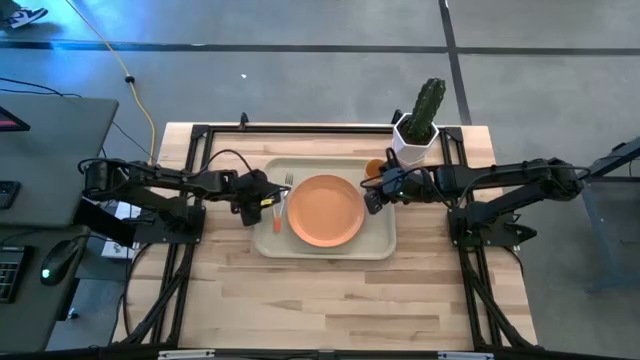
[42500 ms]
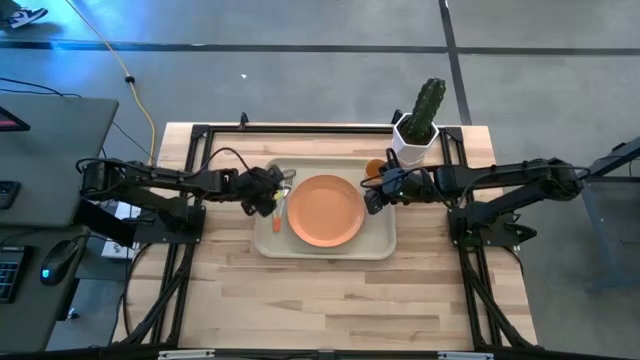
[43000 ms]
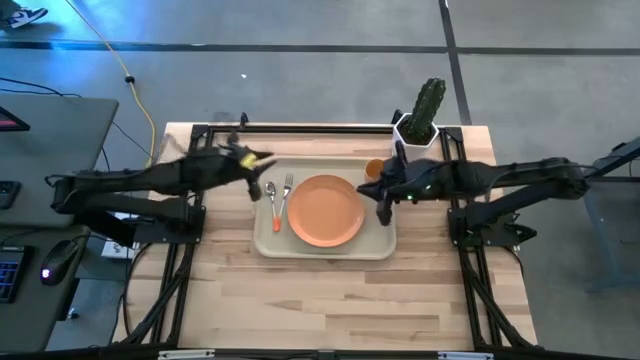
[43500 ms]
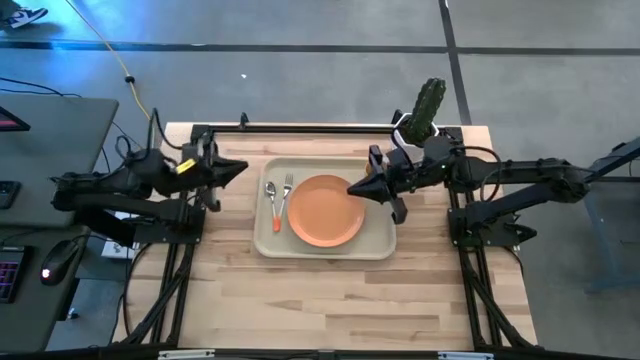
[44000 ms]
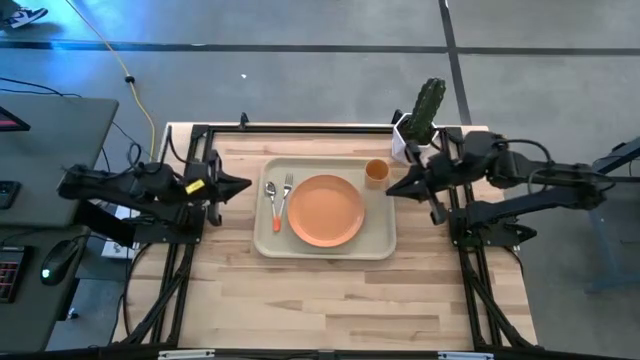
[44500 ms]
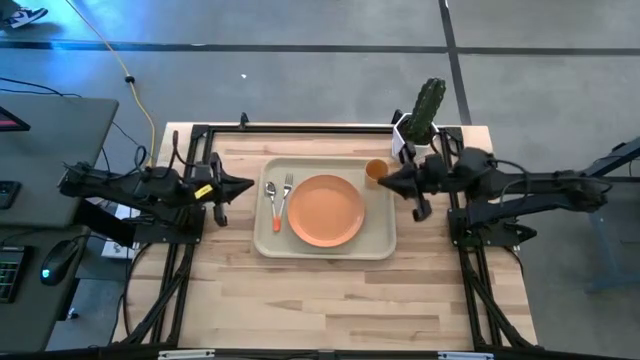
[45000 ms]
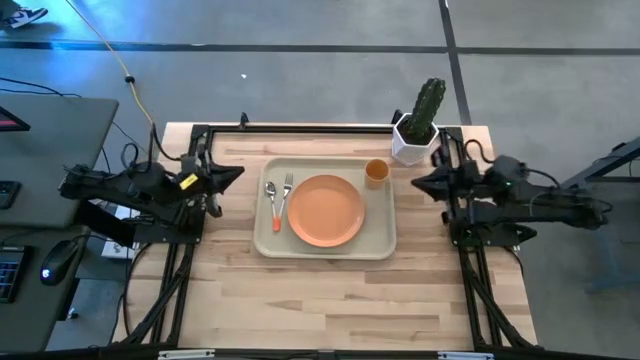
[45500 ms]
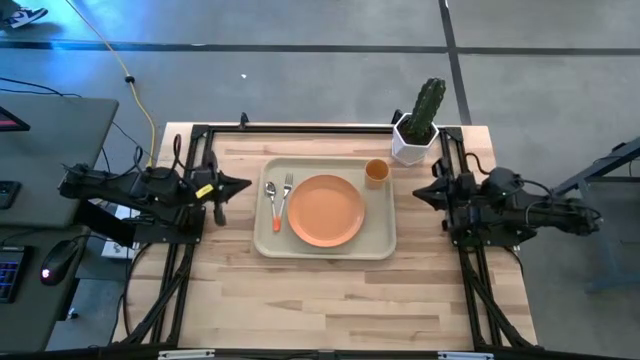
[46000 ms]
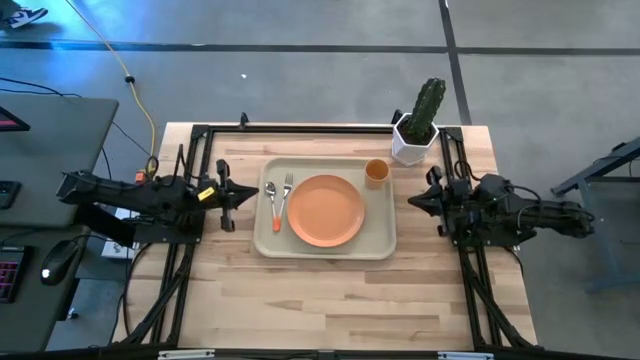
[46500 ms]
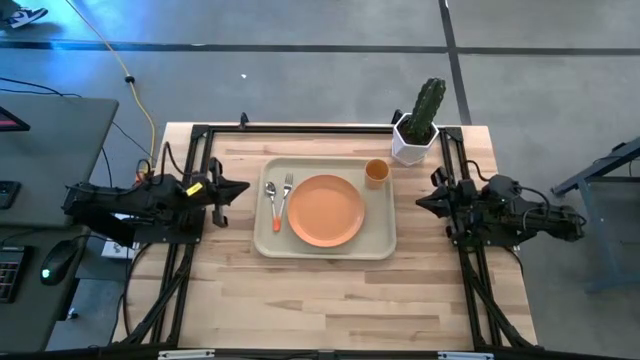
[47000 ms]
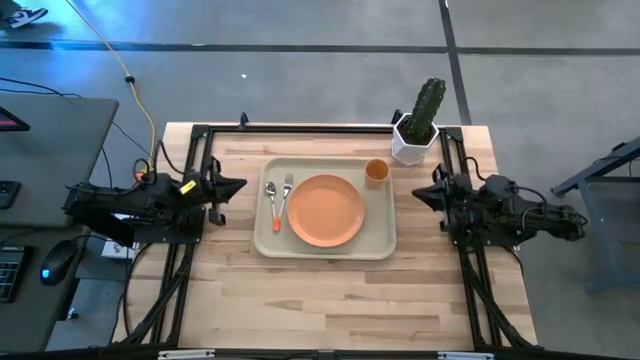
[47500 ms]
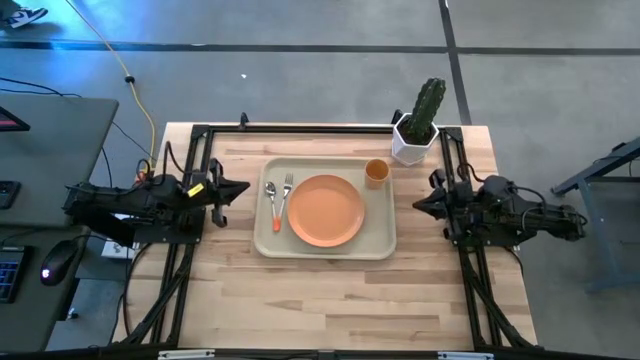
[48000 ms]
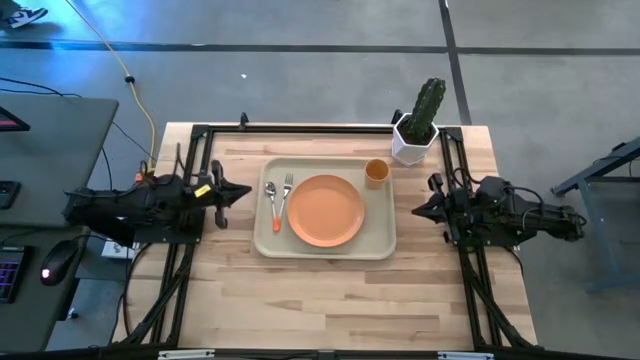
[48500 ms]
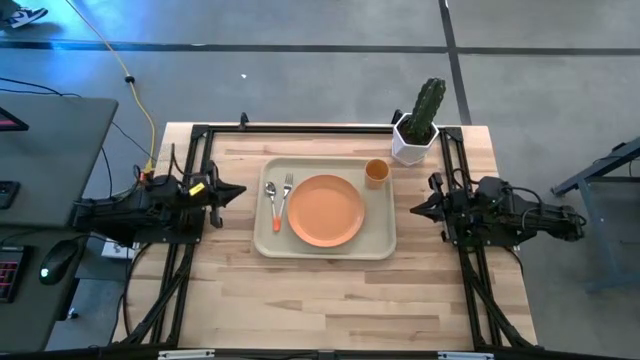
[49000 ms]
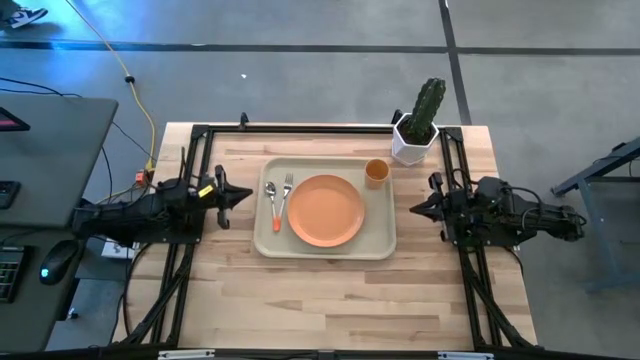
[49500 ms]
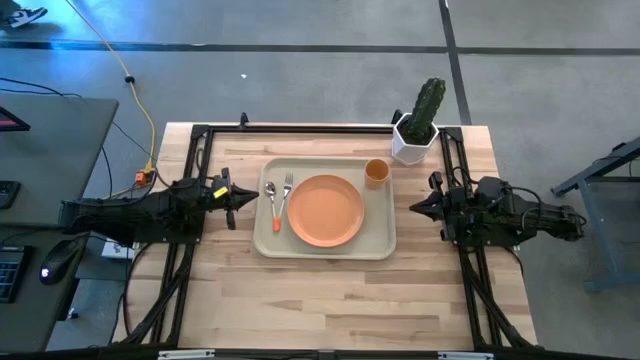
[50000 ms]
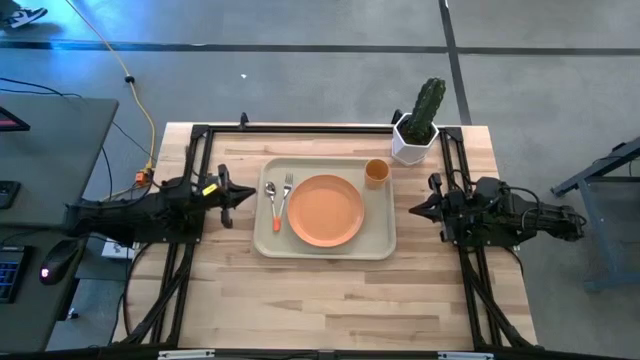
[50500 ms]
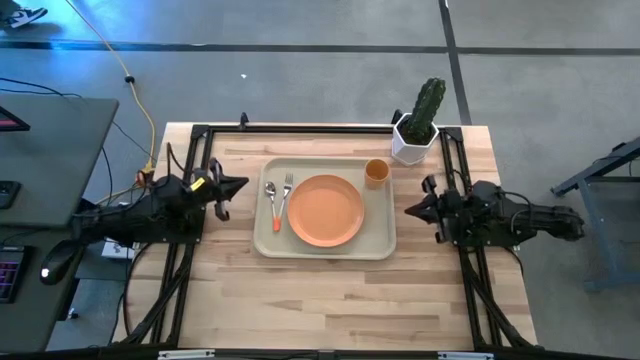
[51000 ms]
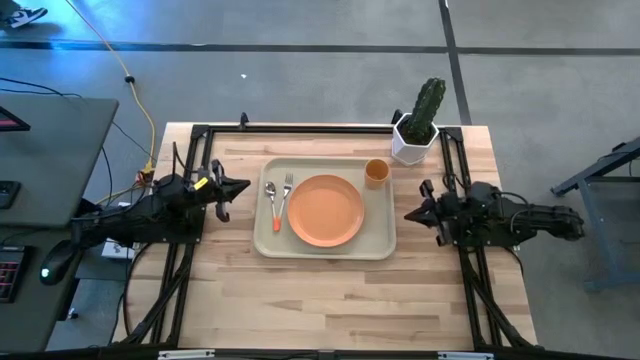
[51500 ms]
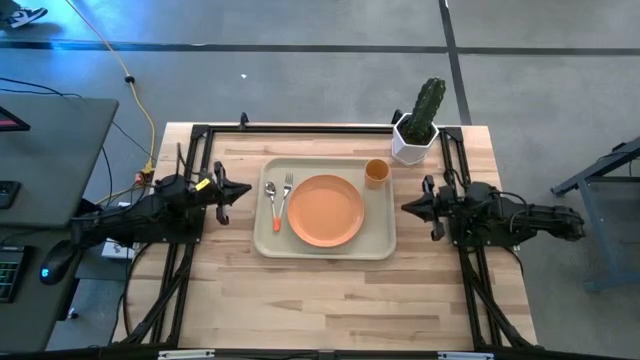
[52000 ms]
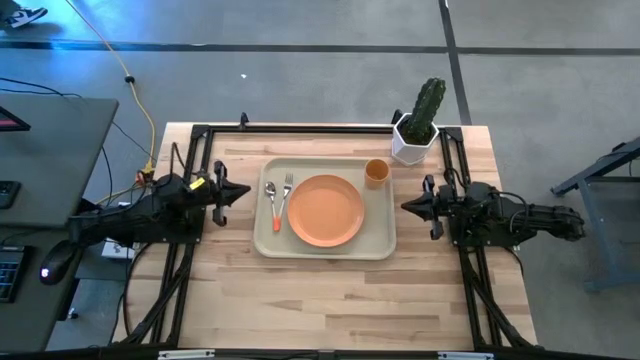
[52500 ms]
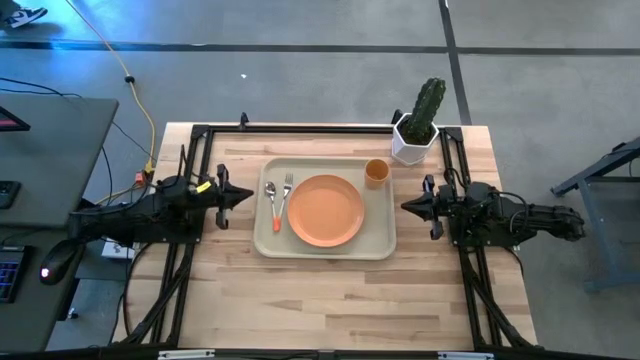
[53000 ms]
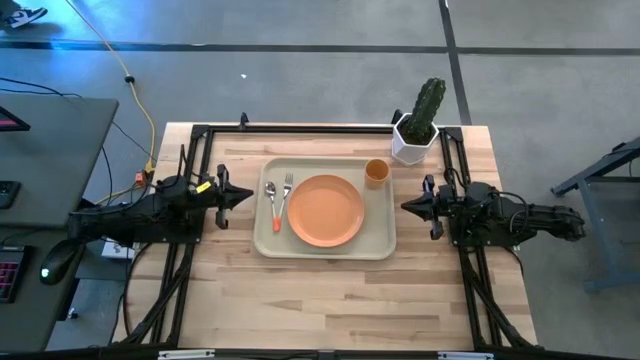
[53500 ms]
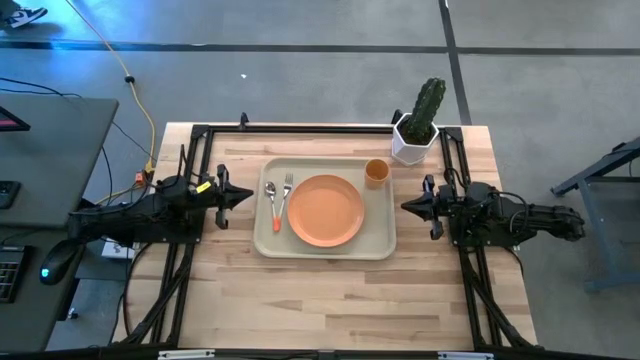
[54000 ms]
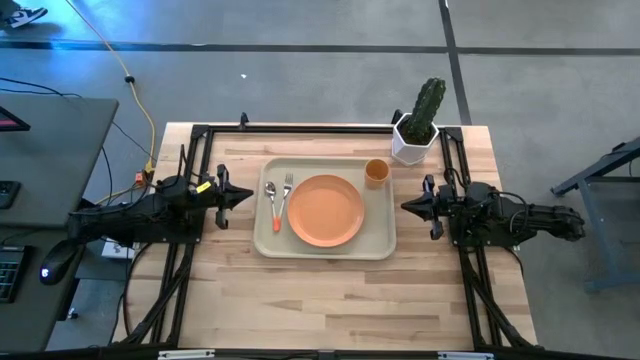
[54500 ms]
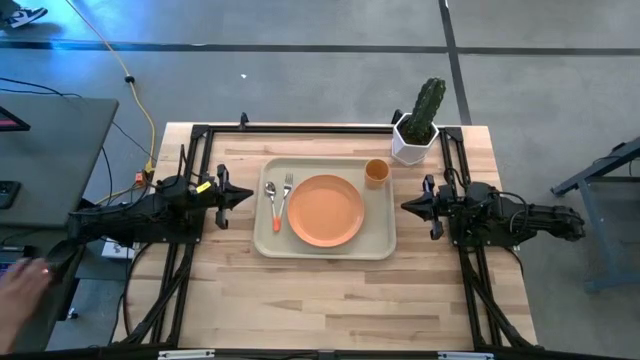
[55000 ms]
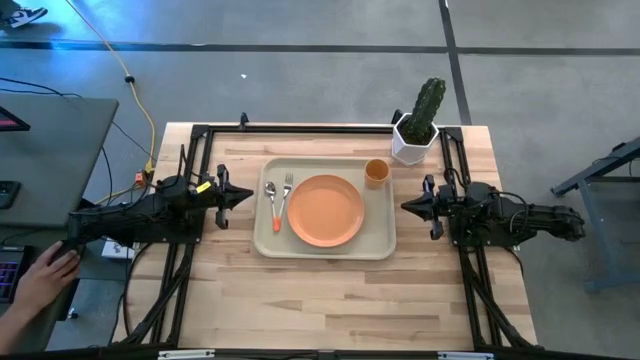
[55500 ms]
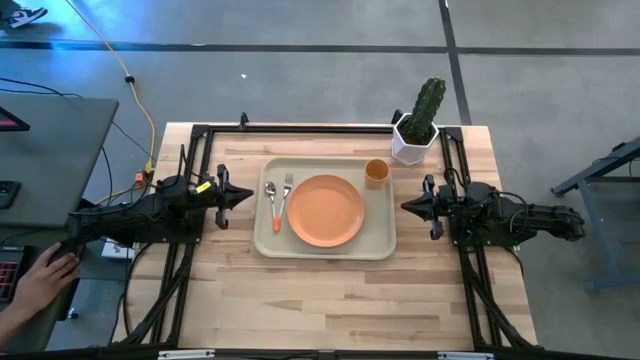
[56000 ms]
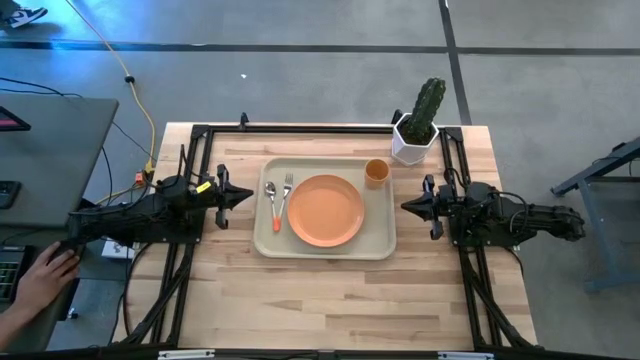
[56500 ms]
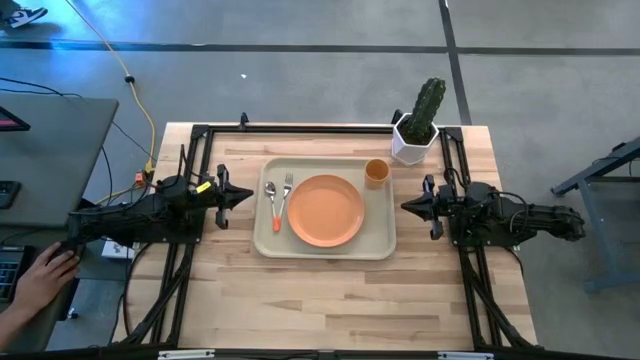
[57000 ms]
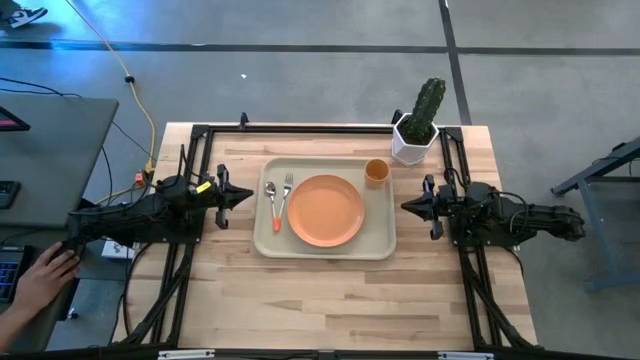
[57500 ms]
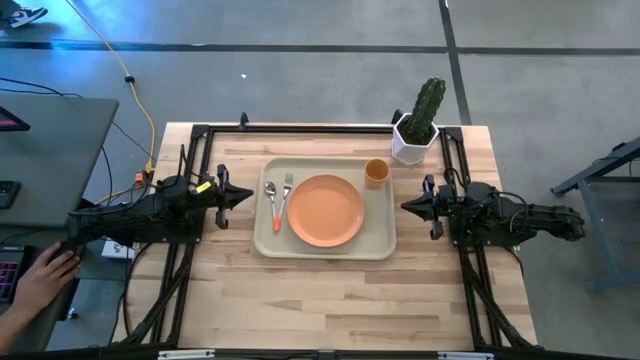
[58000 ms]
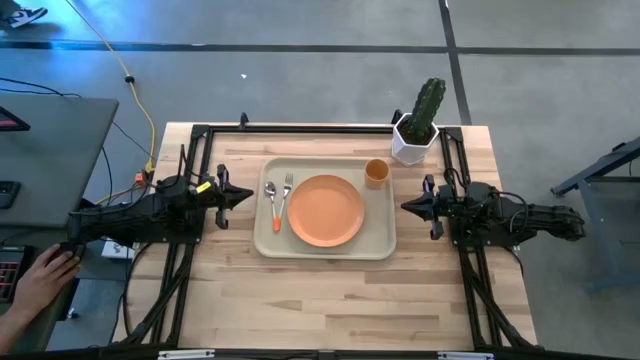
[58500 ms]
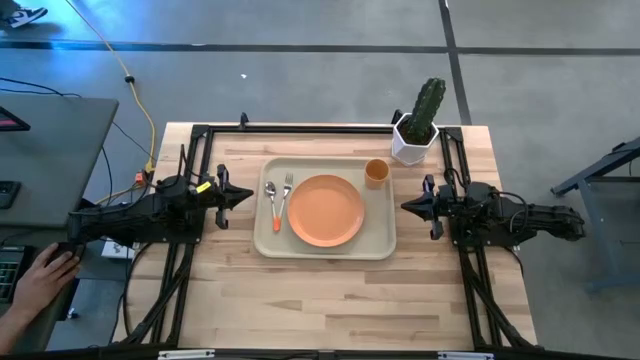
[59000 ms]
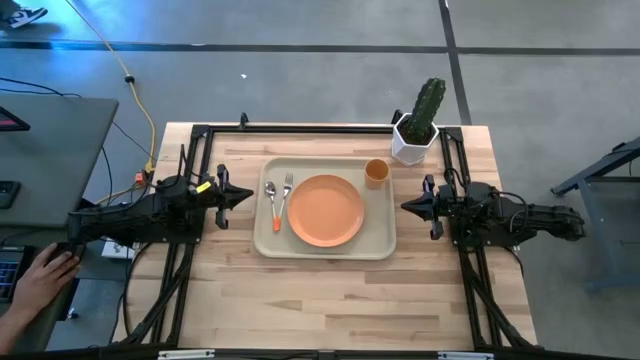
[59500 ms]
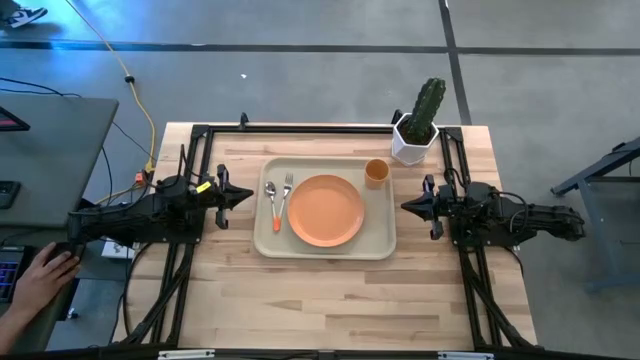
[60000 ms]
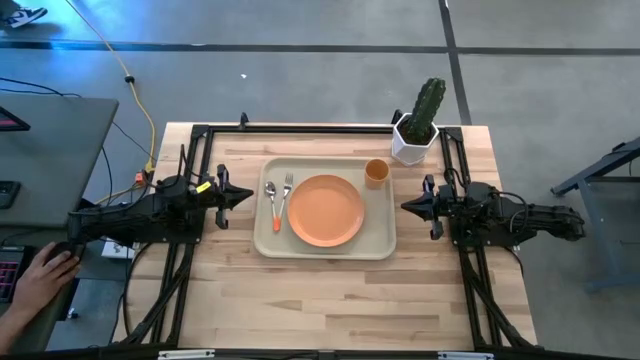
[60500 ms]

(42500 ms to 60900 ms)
Task: Pick and place plate/cup/fork/spoon on tray
Return to Home Position

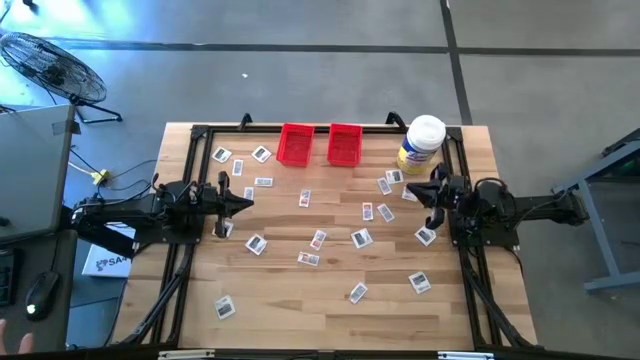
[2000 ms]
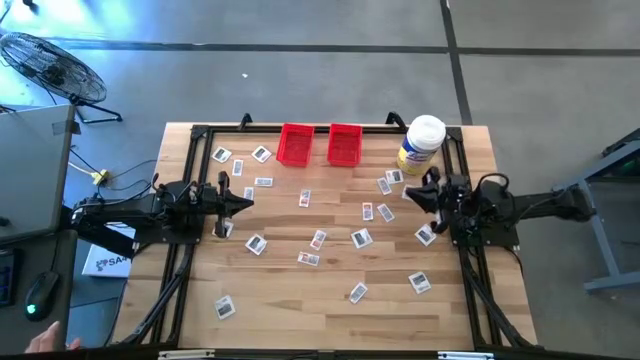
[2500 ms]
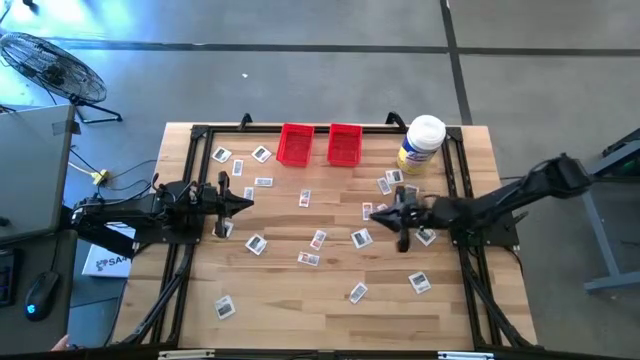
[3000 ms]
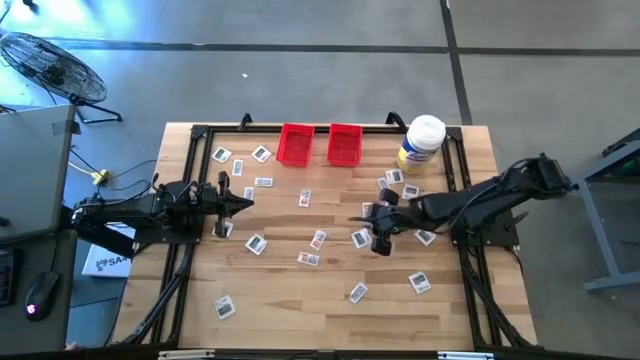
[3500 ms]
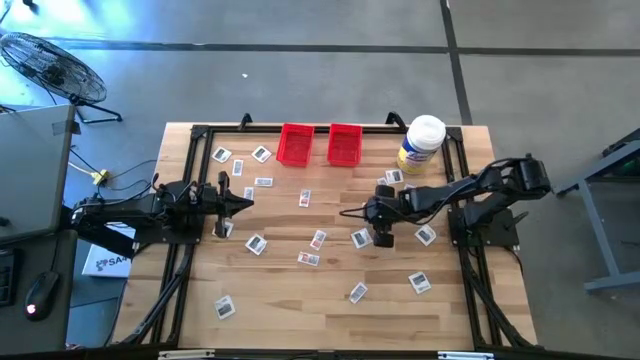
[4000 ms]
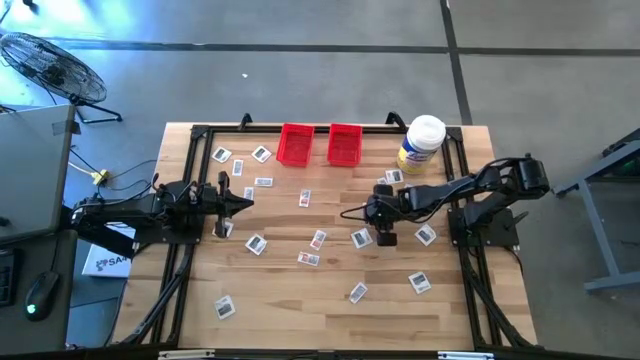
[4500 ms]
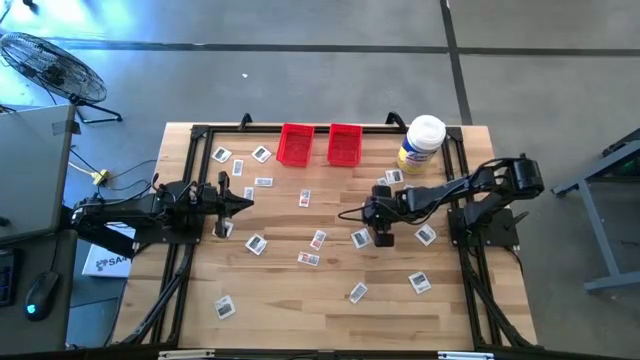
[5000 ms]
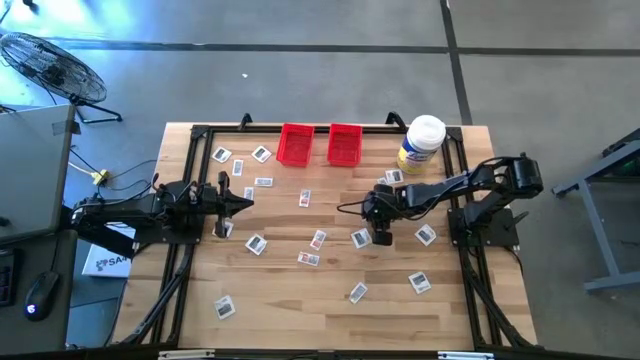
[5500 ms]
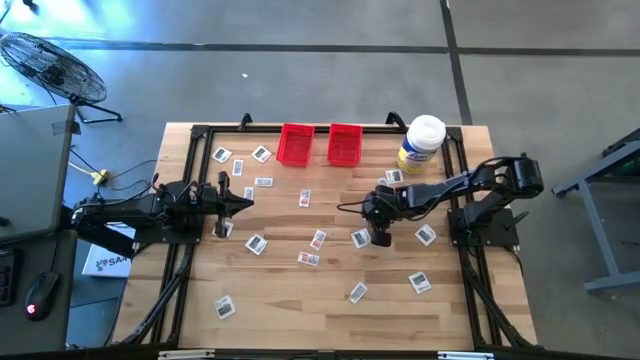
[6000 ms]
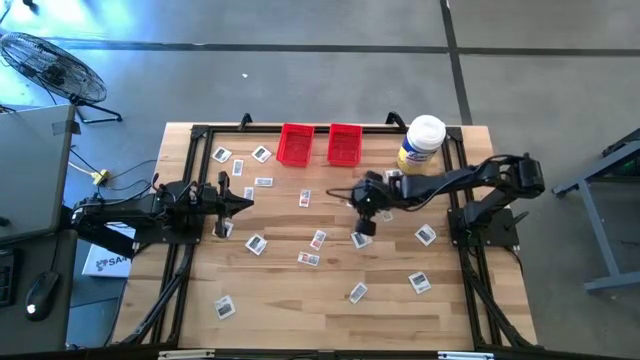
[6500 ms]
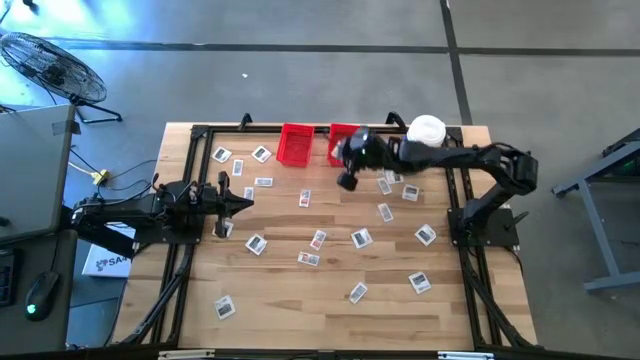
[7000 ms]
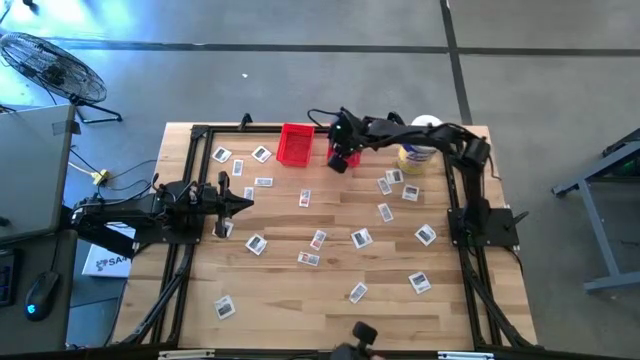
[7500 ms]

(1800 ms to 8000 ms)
Task: Pick & Place First Aid Supplies
Put the ointment pack into the right red bin
